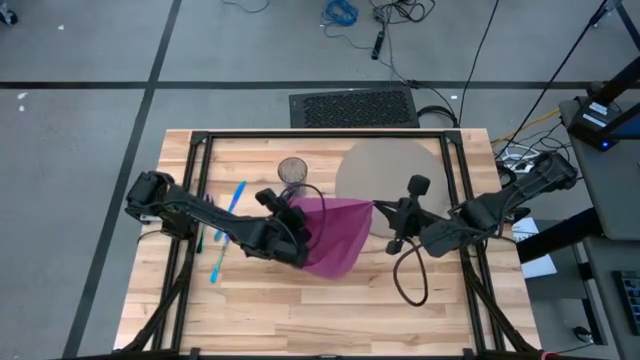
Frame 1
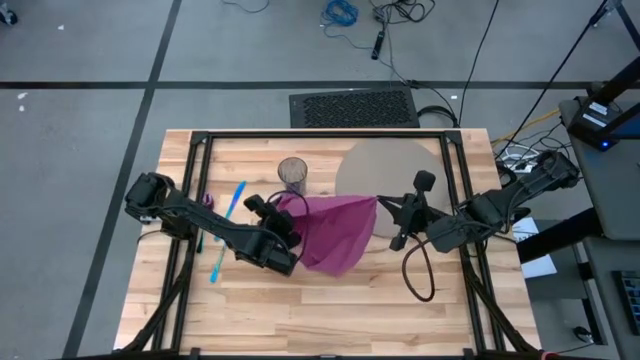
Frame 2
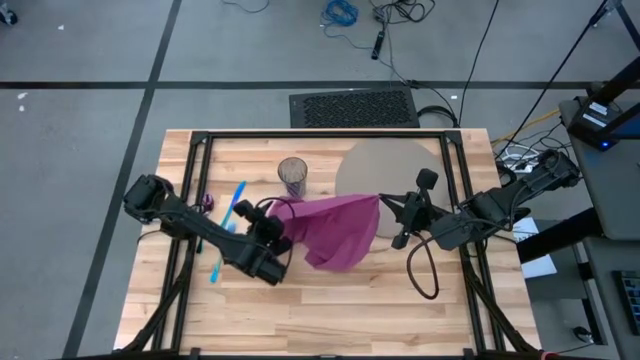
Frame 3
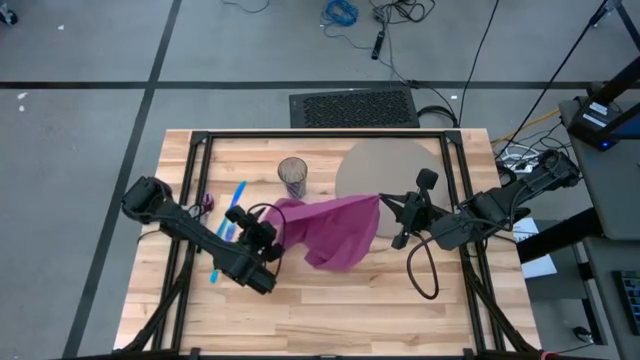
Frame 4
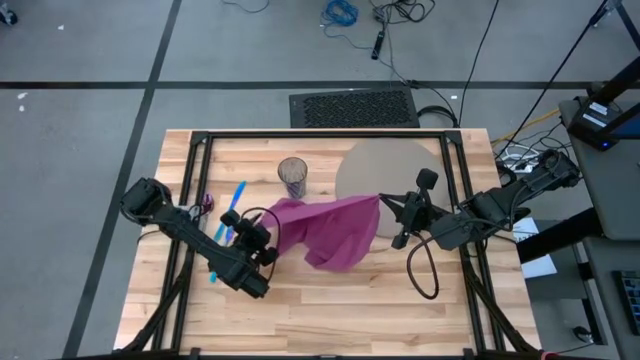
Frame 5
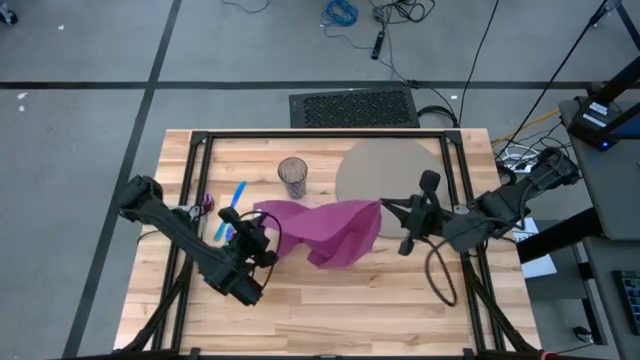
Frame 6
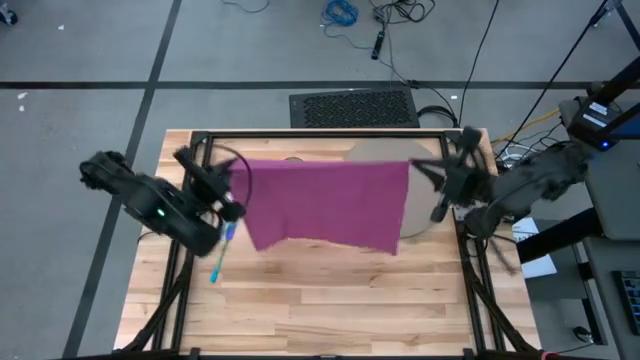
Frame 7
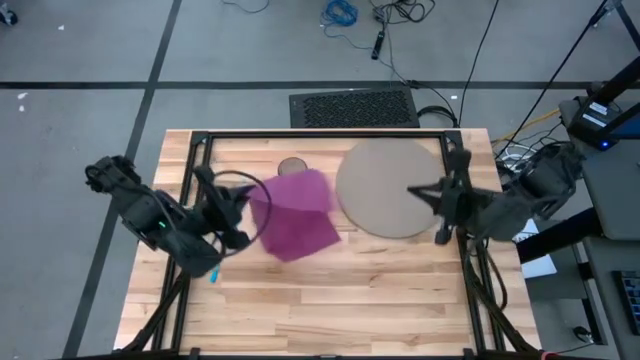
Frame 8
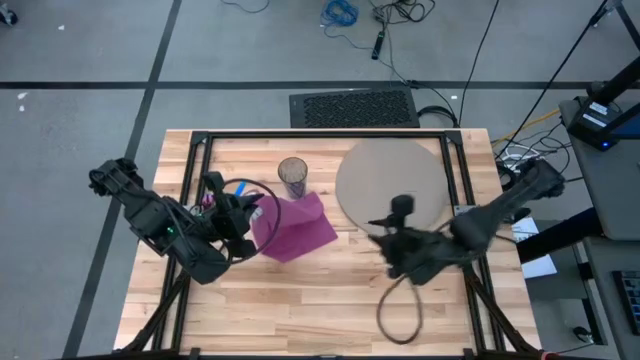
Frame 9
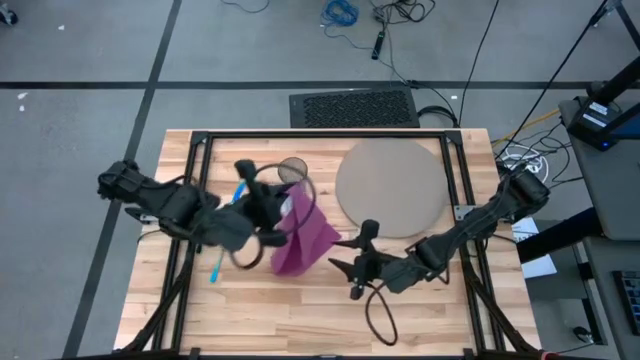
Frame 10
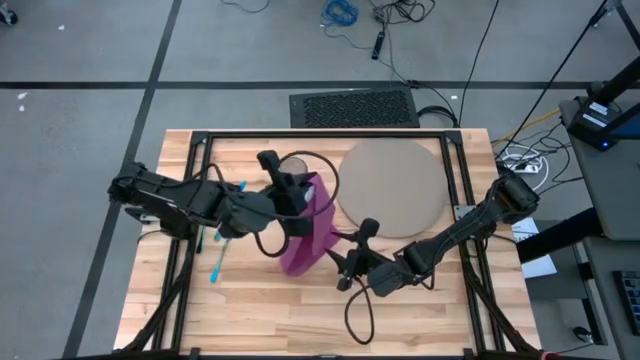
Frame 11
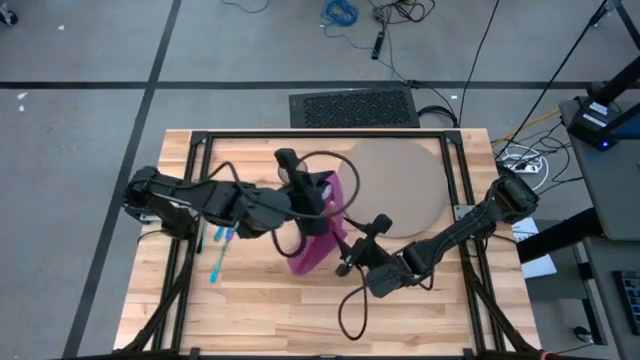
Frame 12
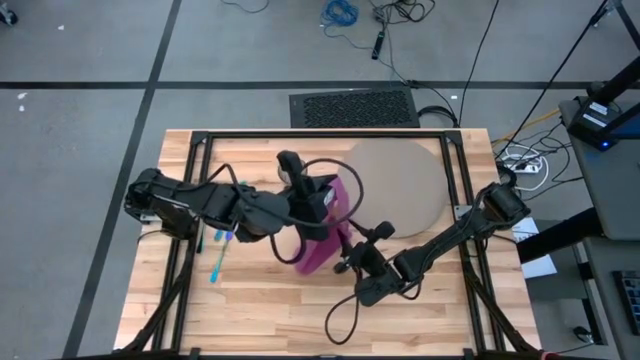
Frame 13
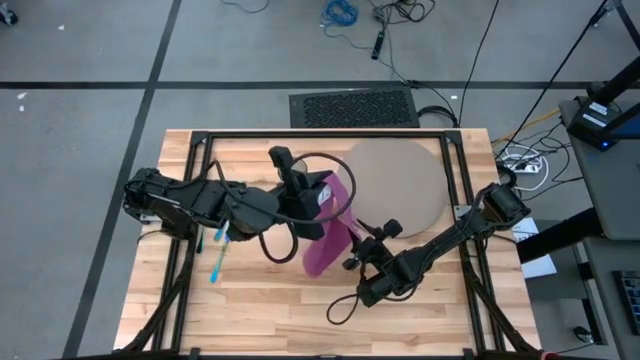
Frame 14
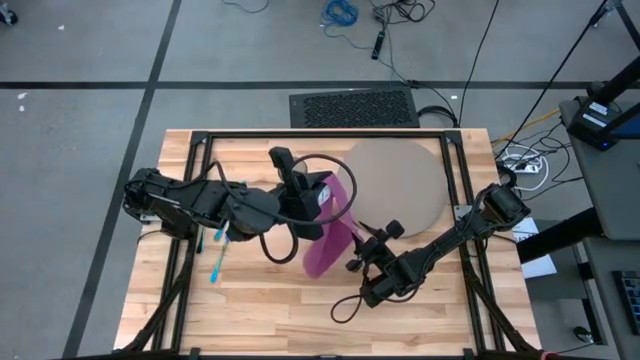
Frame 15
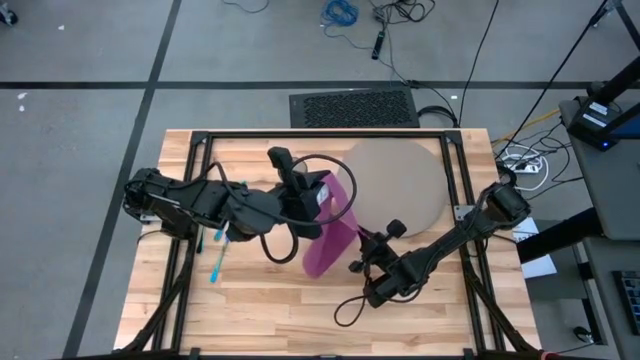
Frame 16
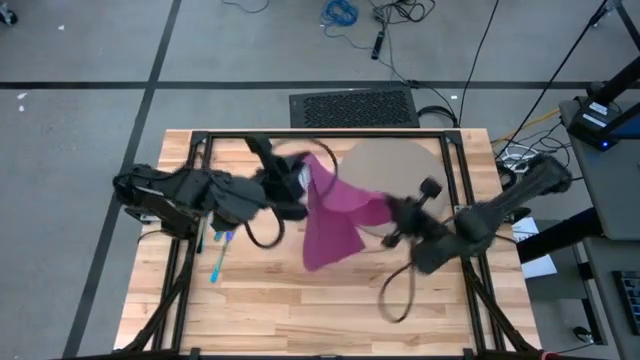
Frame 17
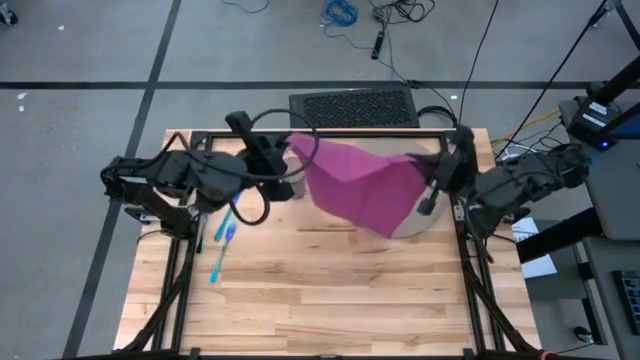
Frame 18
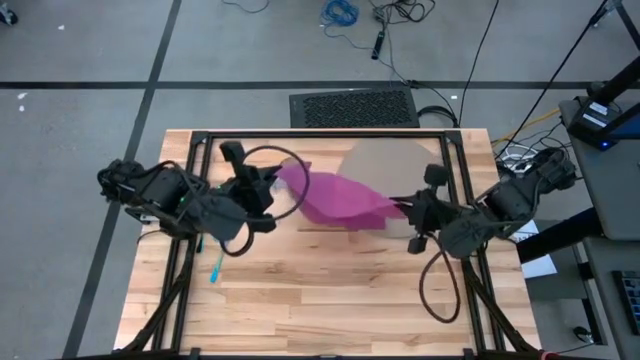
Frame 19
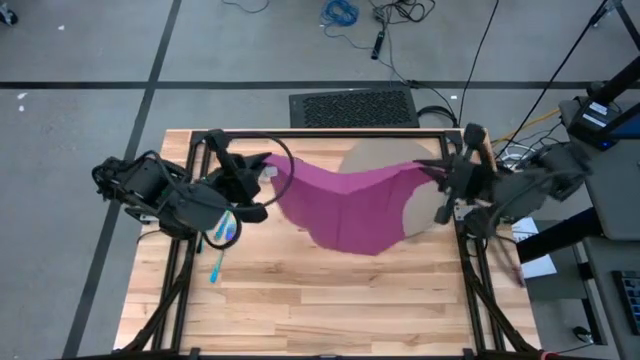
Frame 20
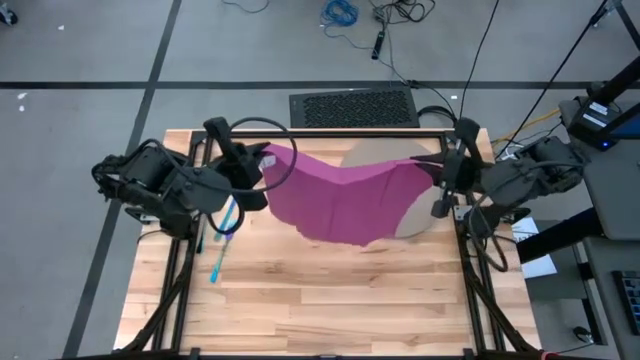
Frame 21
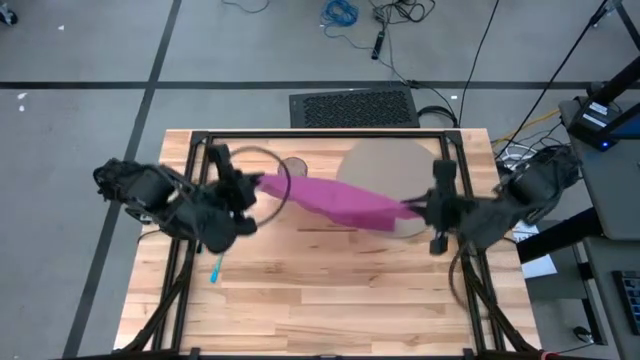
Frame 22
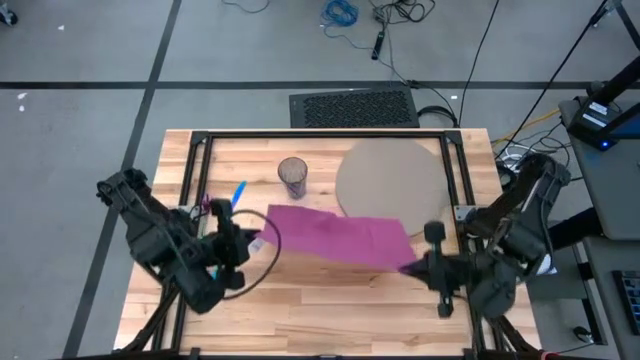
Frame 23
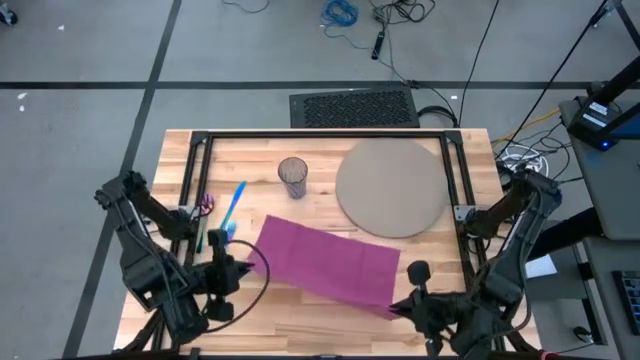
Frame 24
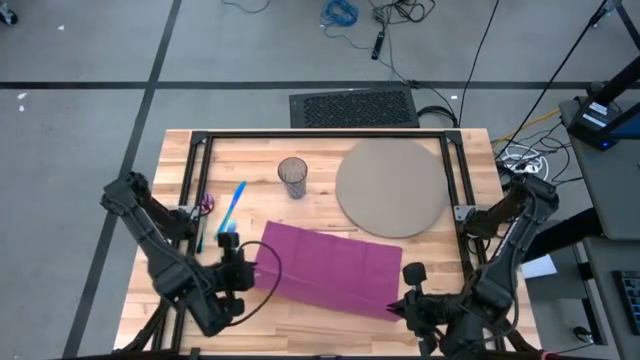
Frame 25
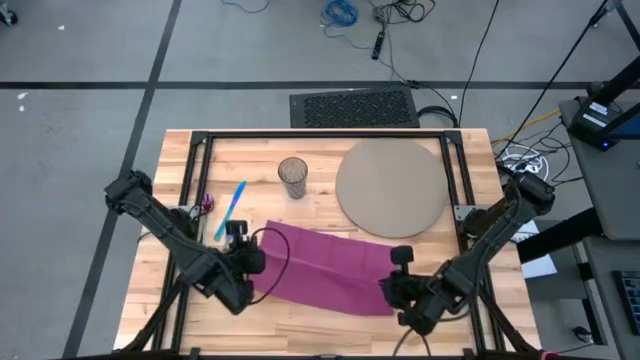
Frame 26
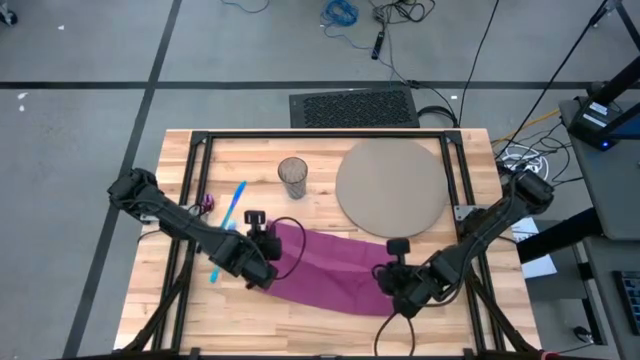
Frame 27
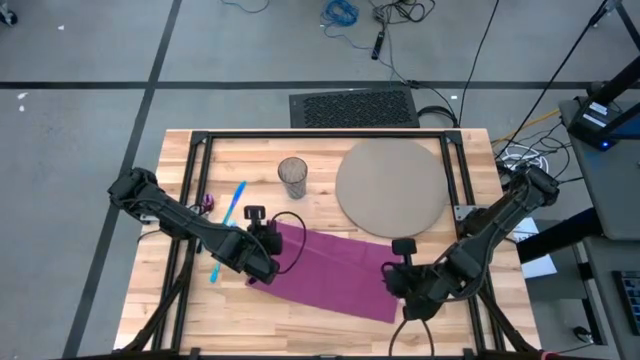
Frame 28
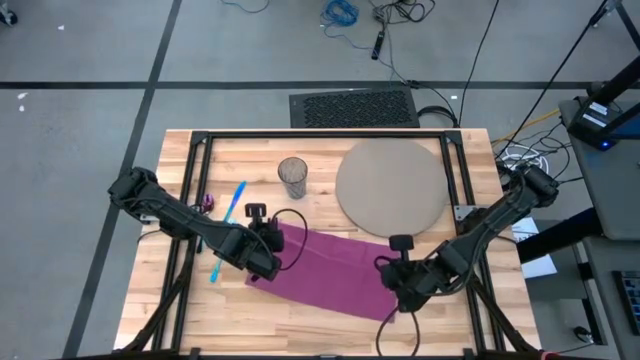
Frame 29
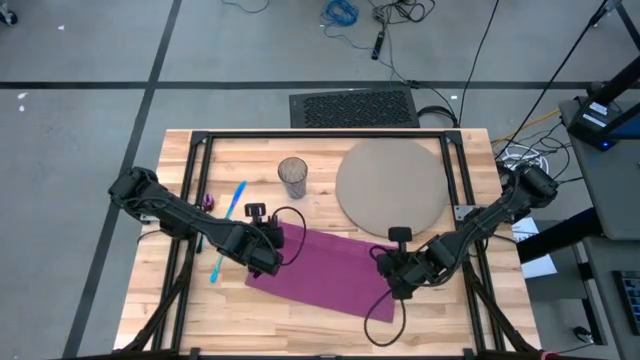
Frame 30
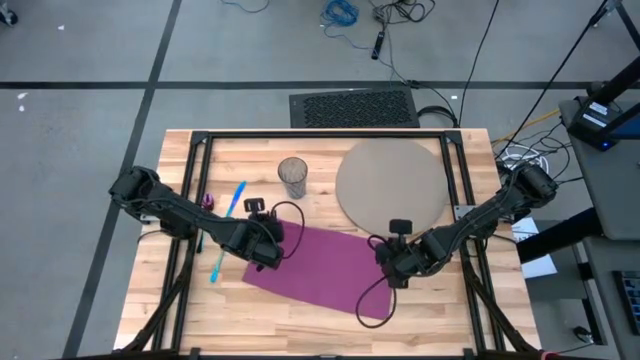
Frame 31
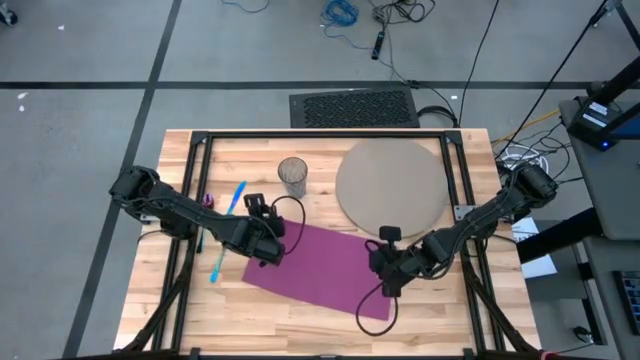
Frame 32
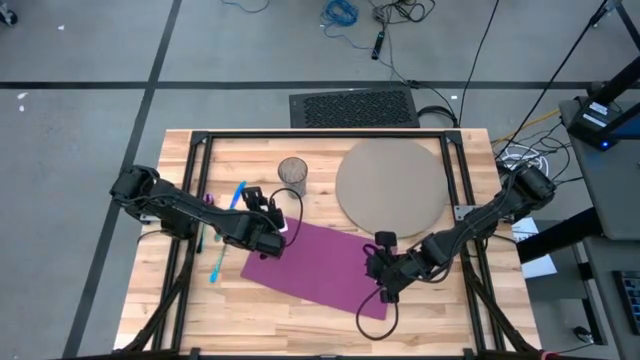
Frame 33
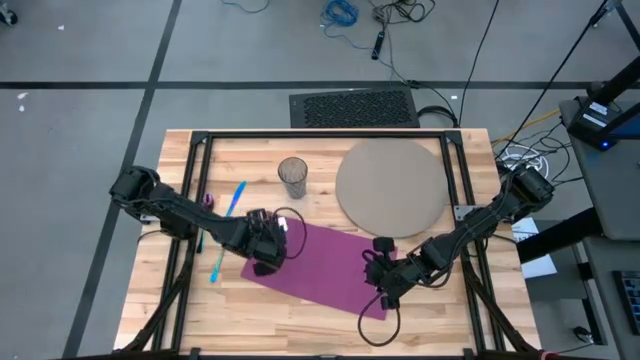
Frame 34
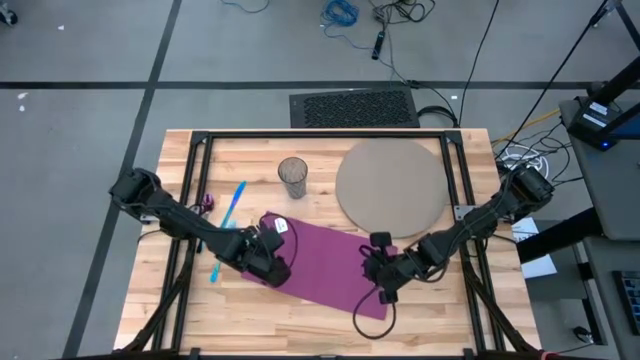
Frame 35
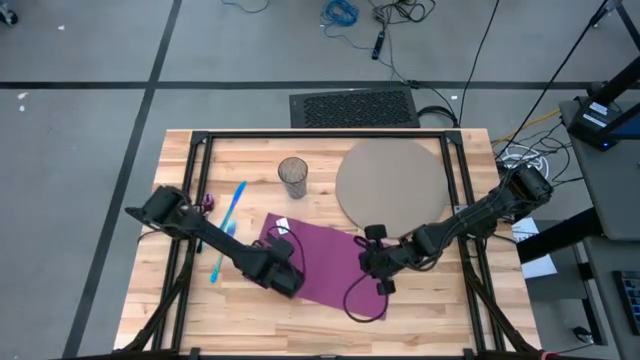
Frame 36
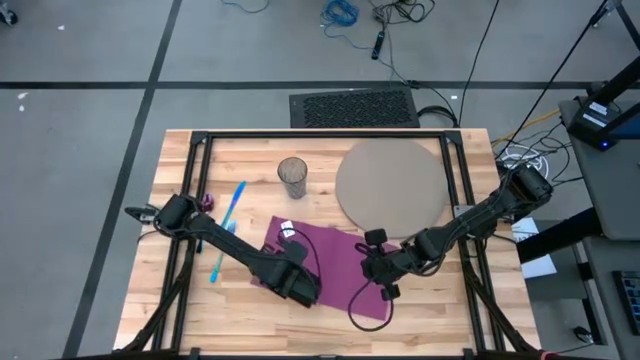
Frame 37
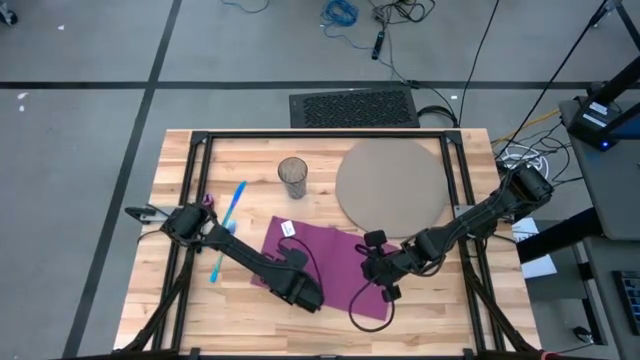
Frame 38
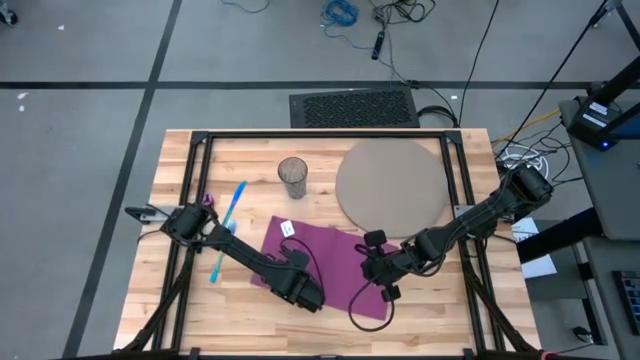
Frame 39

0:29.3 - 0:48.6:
Task: Set table place
Fold the pink table napkin

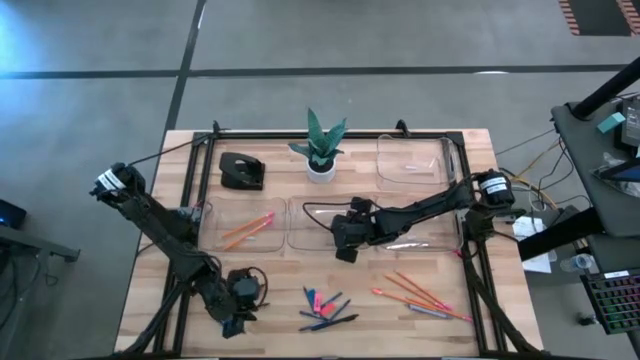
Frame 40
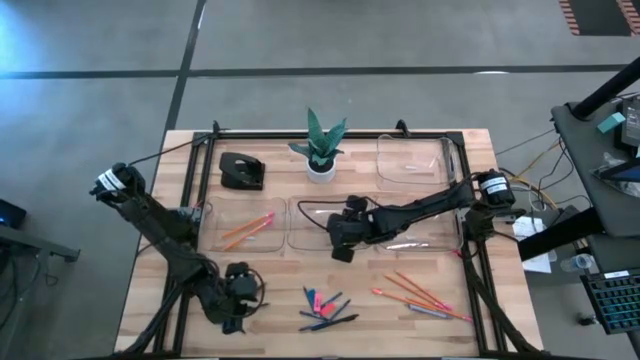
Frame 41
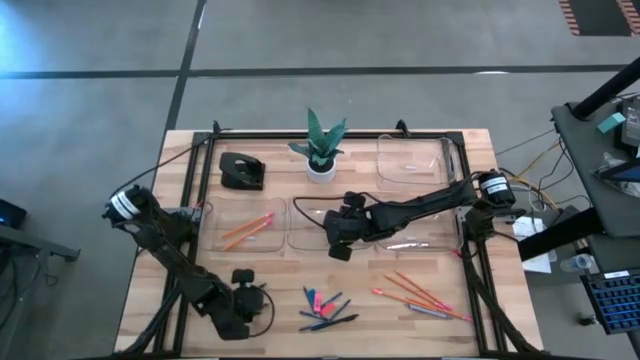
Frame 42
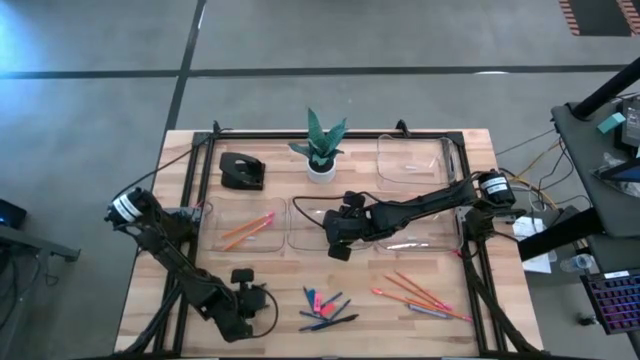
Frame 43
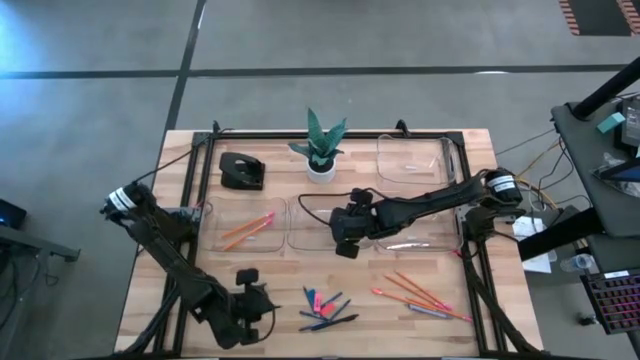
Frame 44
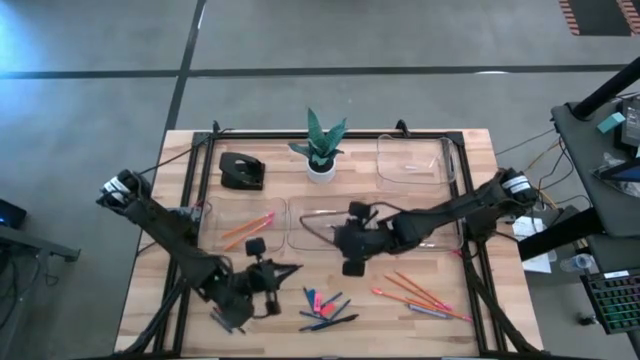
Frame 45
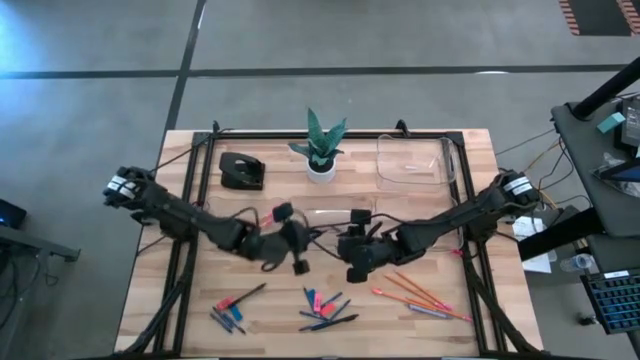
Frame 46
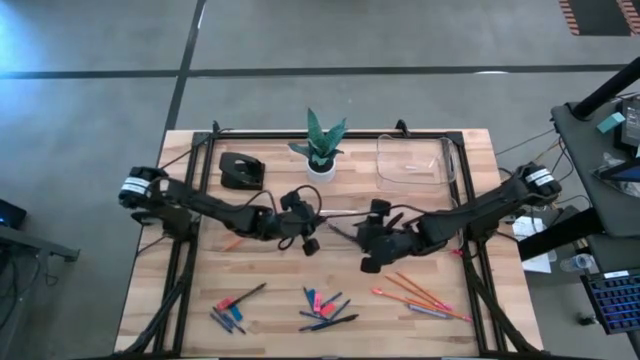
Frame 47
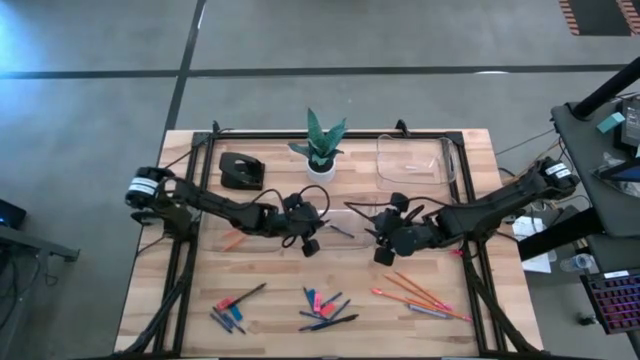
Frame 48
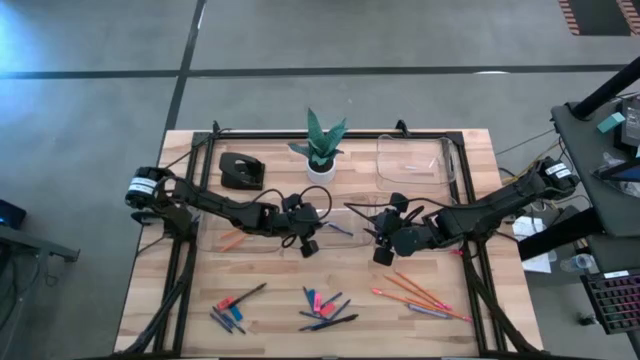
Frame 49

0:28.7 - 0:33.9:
Task: Sort crayons/erasers/pens/pencils in bins
Put the blue crayon into the middle transparent bin
